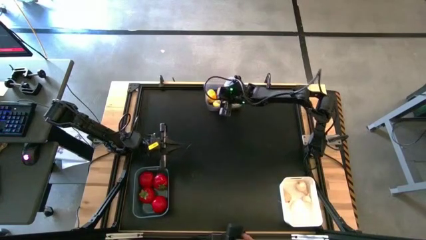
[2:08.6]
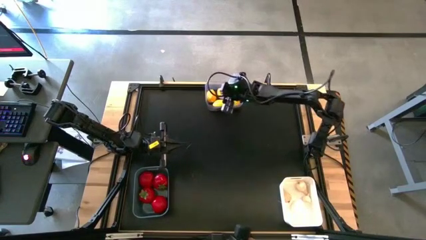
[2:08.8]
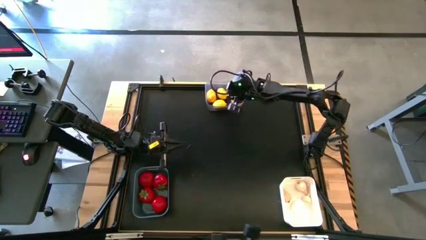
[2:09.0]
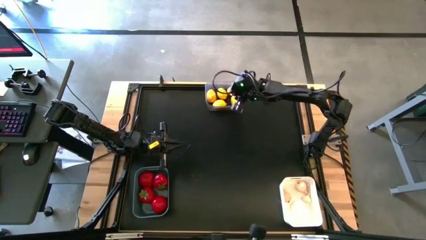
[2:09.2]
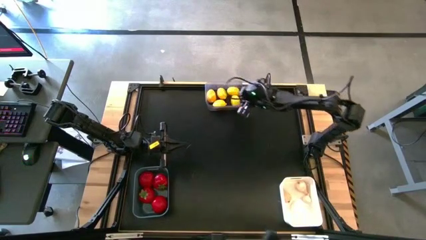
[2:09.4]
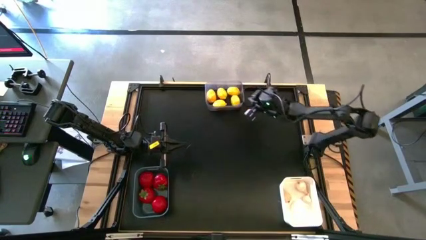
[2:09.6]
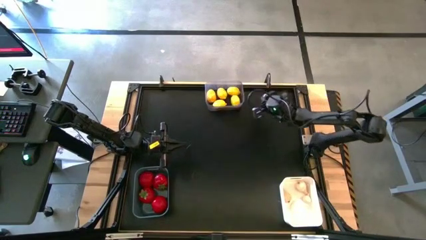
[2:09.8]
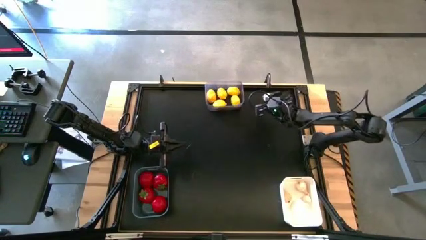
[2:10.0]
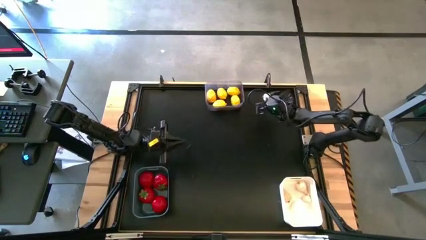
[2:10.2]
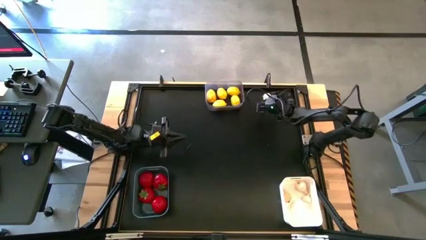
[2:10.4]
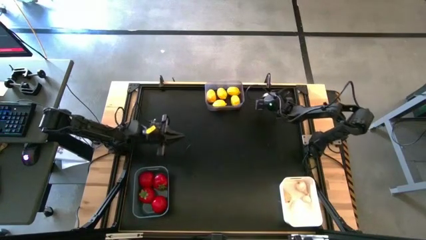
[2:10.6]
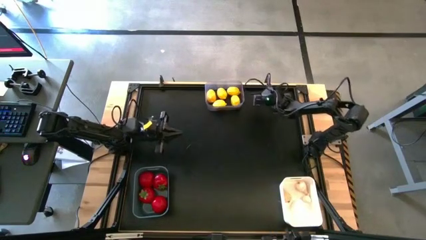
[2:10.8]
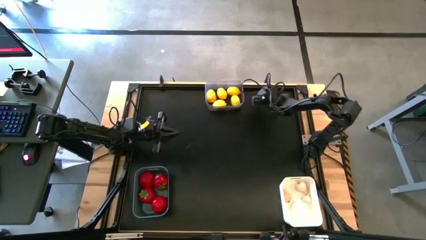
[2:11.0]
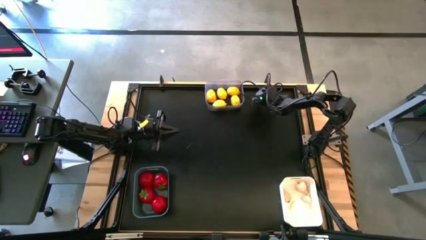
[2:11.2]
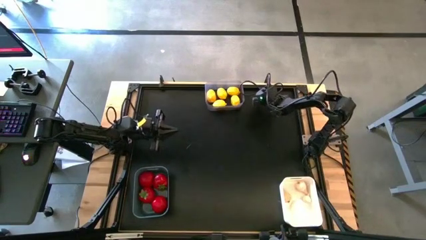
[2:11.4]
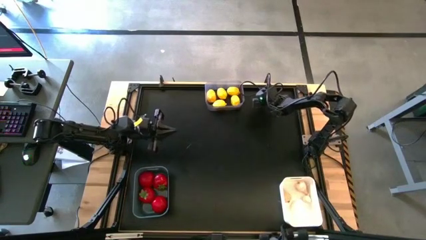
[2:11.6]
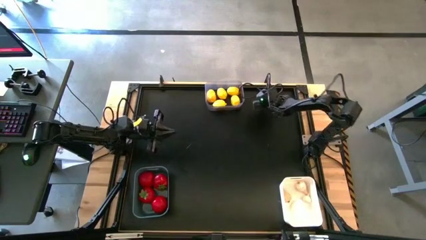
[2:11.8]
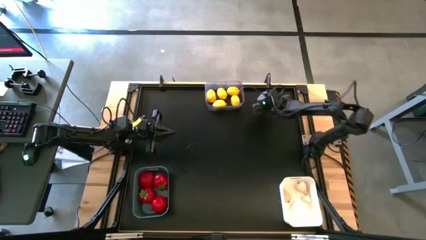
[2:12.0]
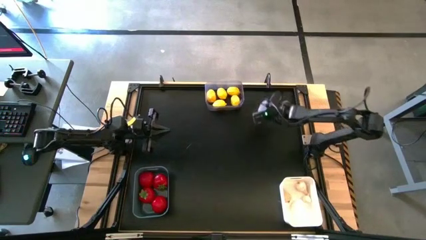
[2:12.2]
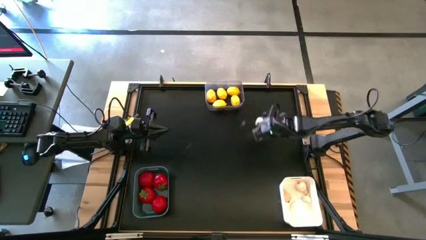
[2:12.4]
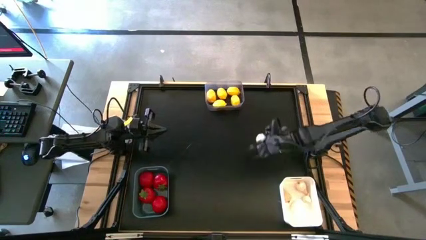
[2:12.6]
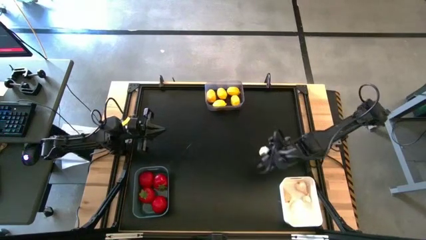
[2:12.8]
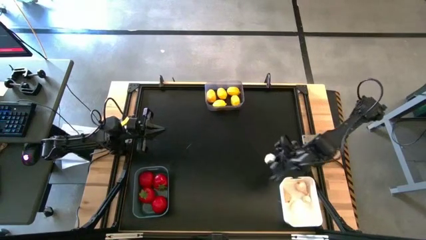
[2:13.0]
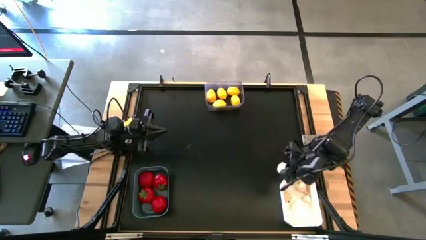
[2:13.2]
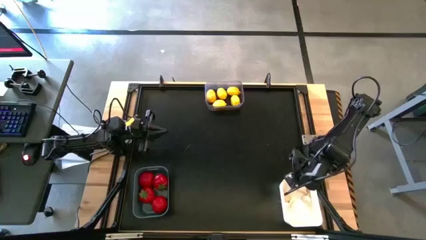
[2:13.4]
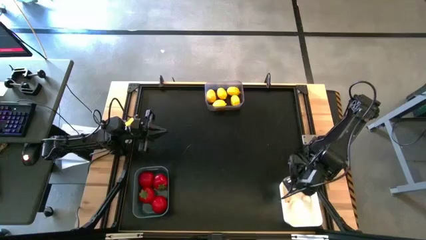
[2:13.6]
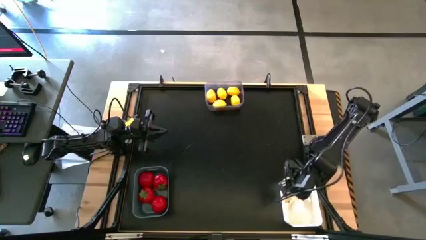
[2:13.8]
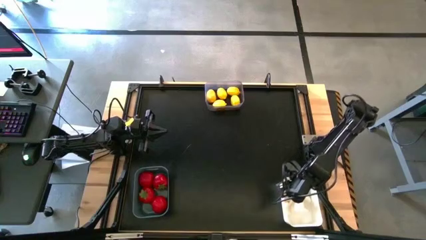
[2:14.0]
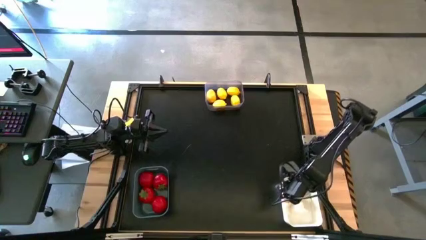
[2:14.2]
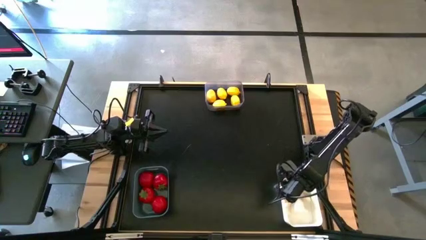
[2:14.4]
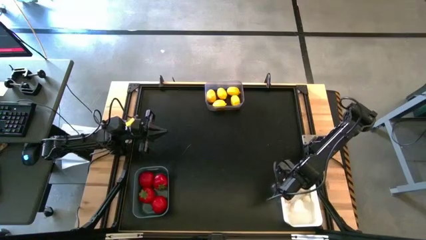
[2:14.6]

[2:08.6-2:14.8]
Task: Sort produce into baskets
Put the garlic into the white bin

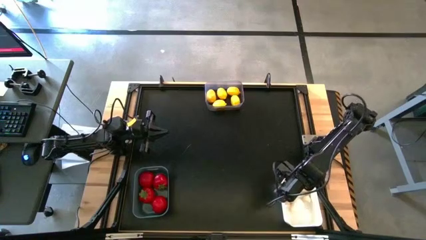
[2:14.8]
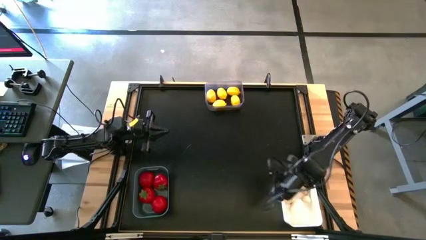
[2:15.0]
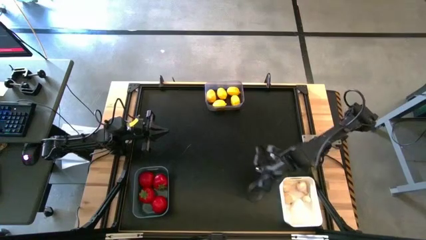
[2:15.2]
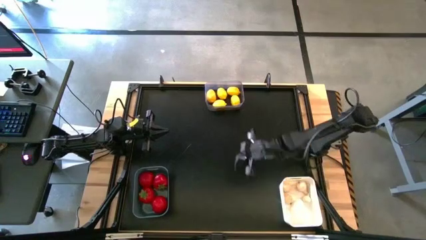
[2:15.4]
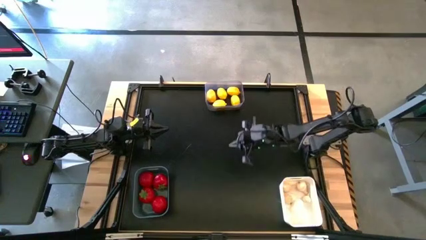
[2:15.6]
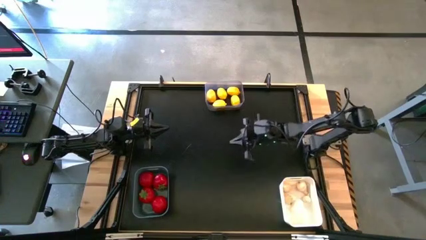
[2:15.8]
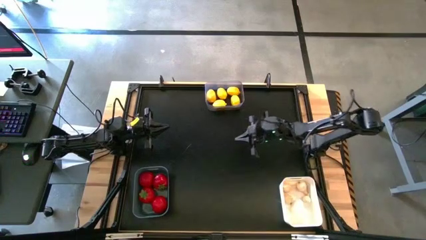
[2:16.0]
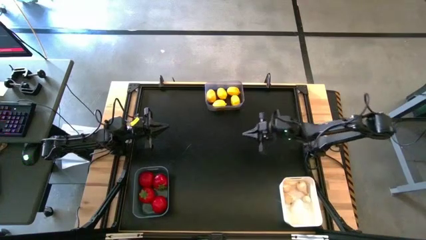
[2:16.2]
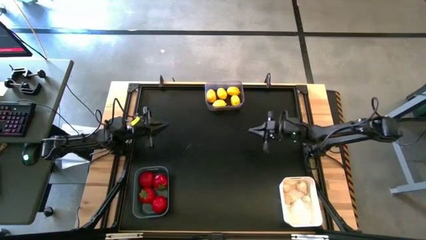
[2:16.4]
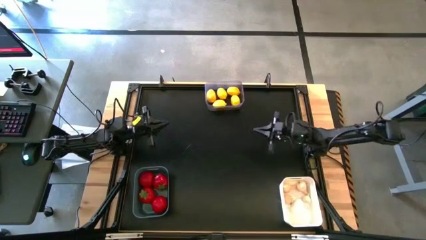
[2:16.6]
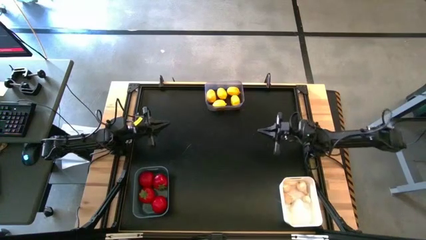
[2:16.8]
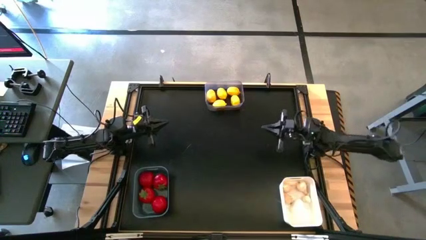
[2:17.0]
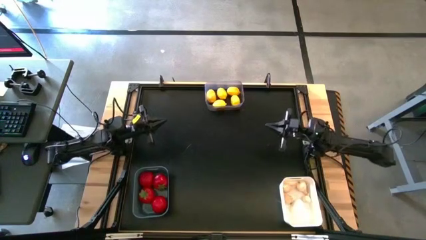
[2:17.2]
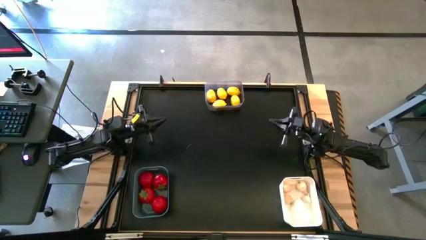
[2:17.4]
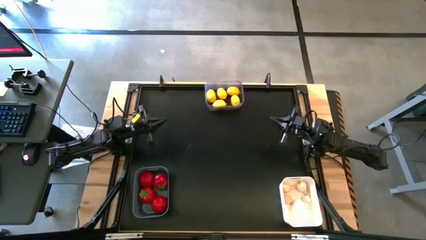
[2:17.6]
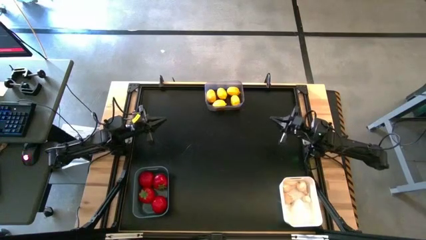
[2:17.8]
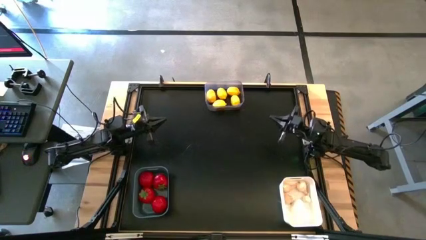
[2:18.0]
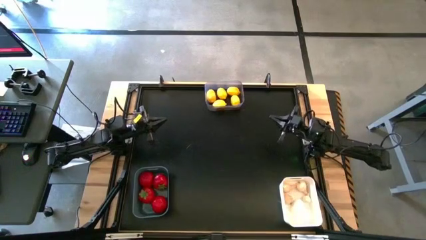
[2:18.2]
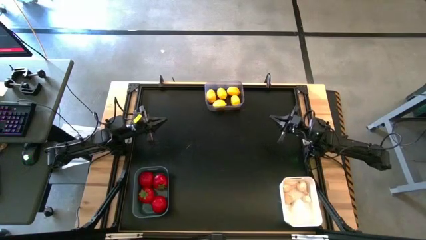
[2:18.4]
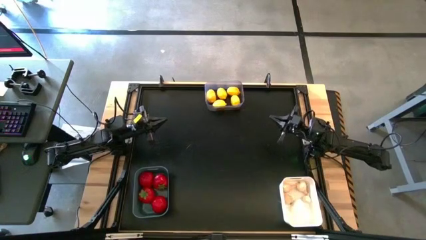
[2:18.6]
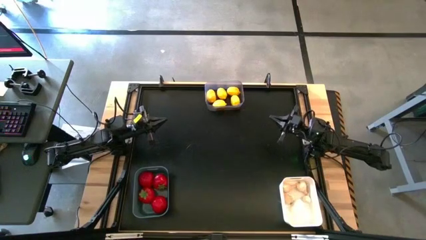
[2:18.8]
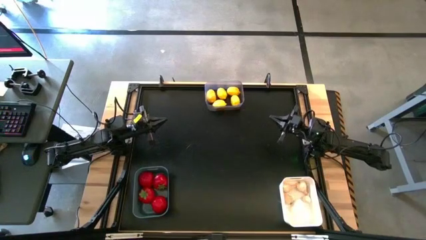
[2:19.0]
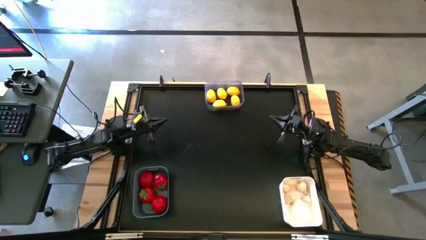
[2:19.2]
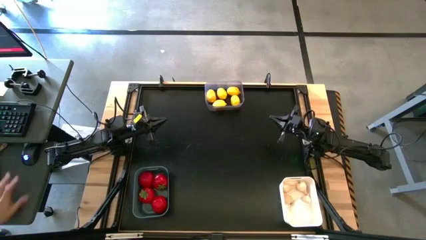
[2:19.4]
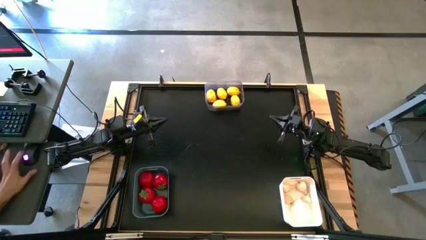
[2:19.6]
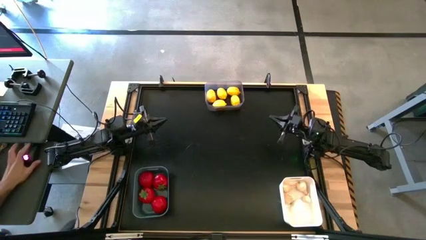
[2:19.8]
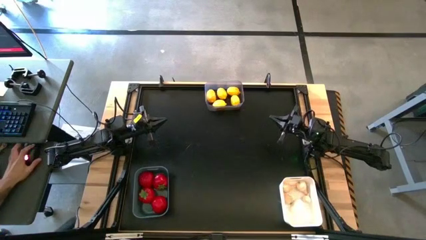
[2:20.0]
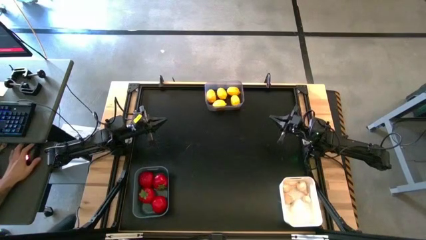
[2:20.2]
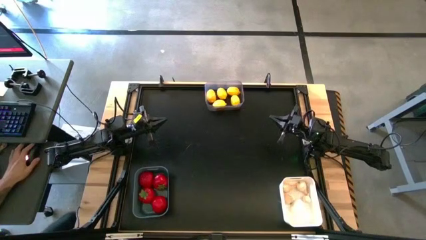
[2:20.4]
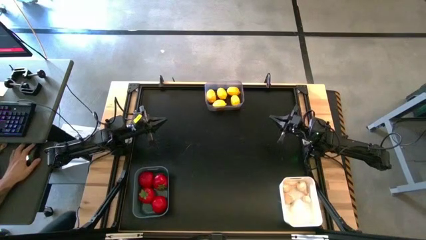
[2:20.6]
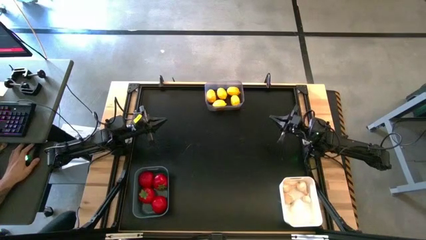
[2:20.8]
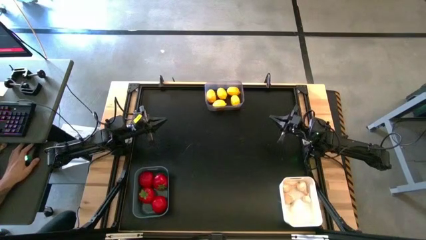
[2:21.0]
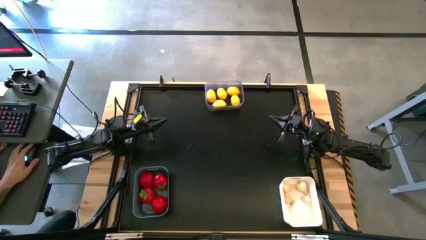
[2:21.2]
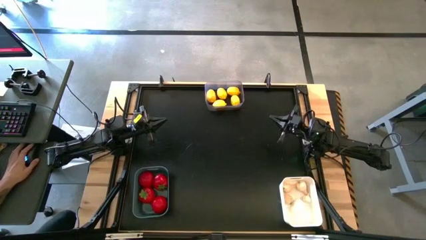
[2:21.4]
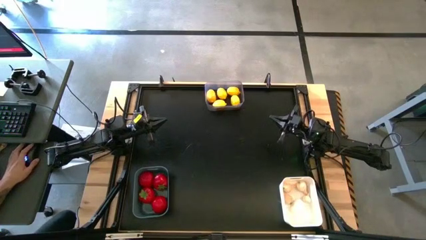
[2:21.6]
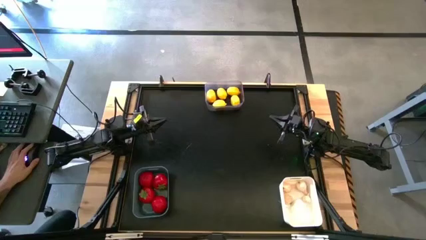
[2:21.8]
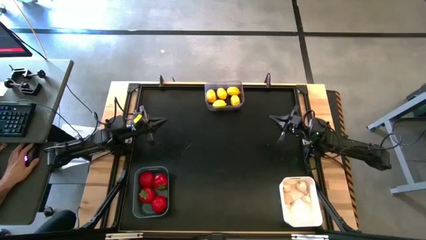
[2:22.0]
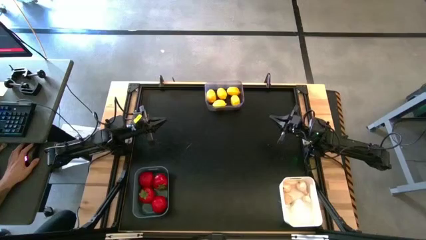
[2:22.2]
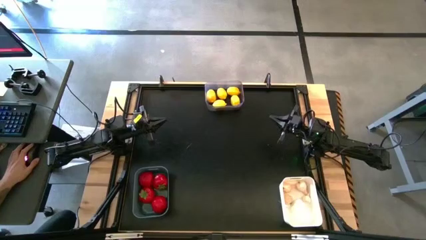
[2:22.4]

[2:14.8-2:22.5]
Return to Home Position
